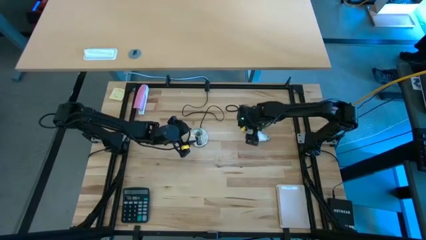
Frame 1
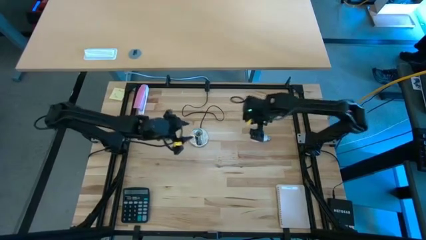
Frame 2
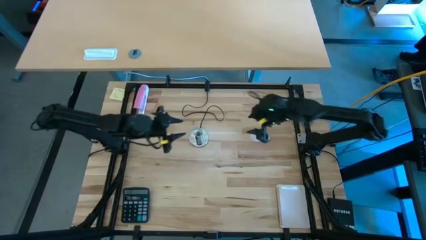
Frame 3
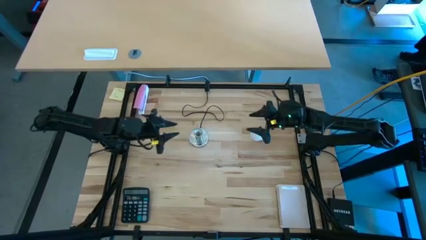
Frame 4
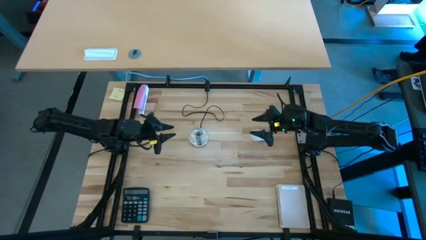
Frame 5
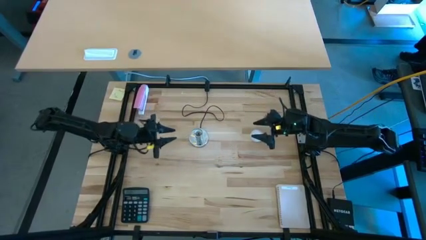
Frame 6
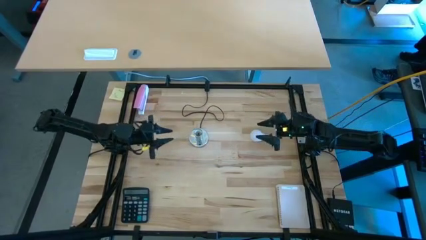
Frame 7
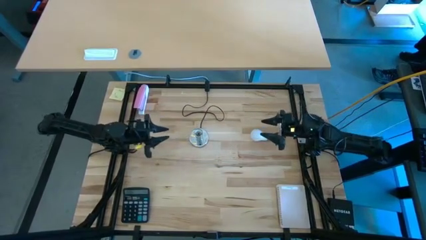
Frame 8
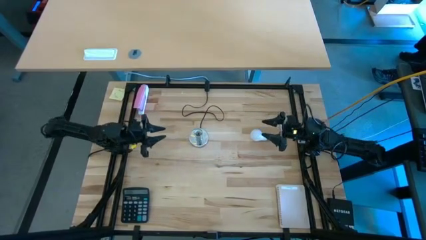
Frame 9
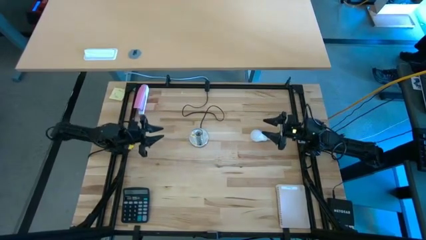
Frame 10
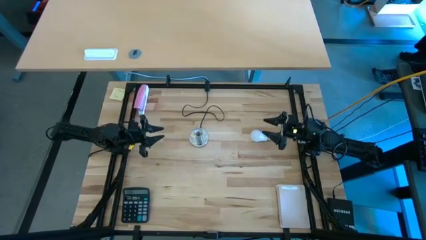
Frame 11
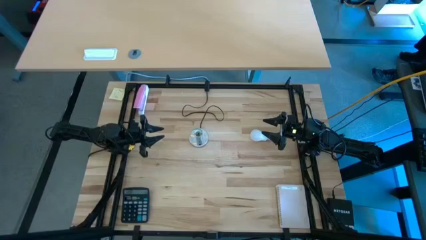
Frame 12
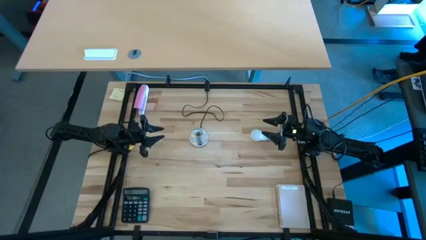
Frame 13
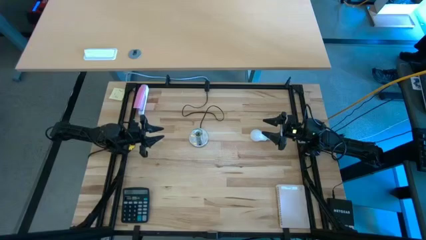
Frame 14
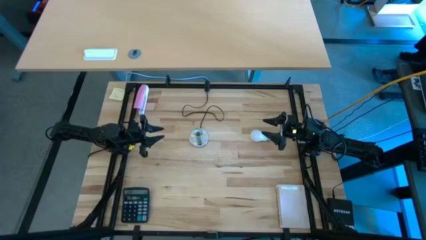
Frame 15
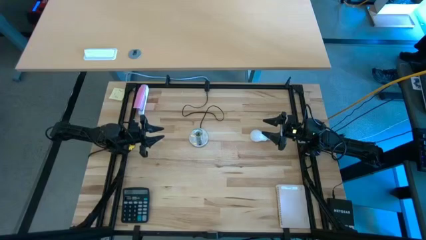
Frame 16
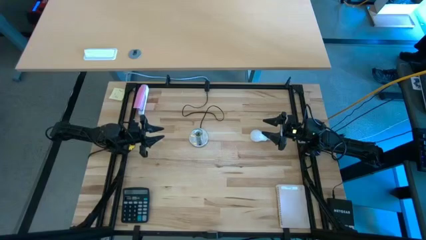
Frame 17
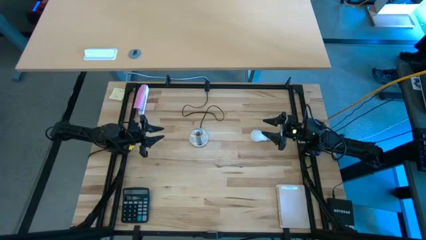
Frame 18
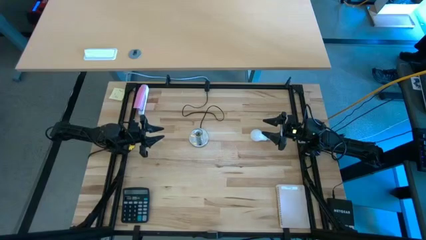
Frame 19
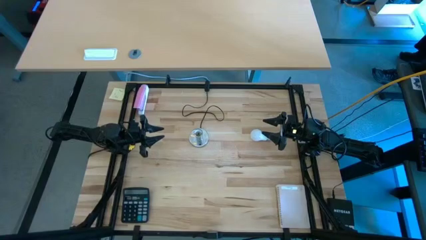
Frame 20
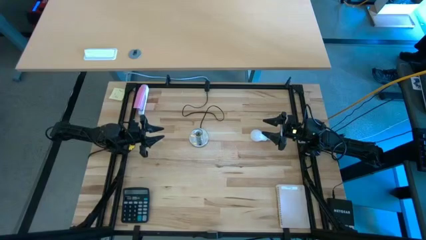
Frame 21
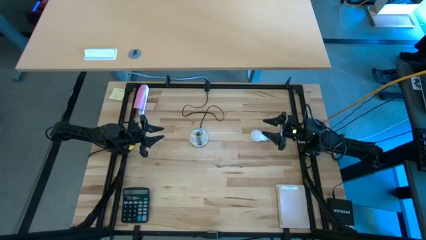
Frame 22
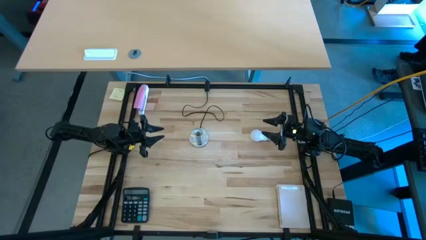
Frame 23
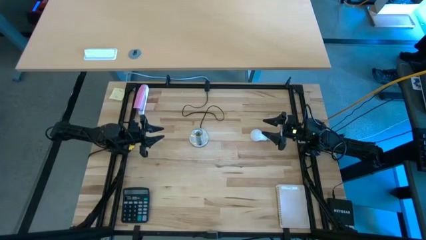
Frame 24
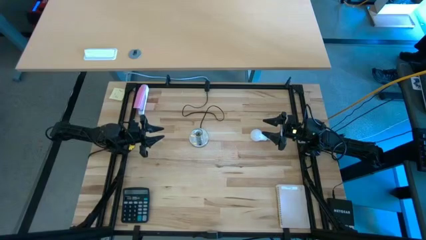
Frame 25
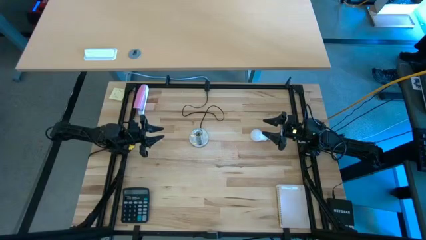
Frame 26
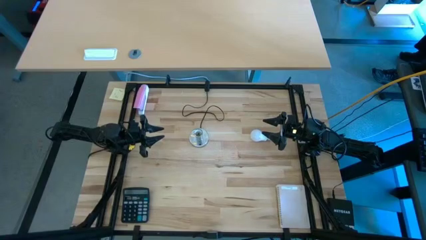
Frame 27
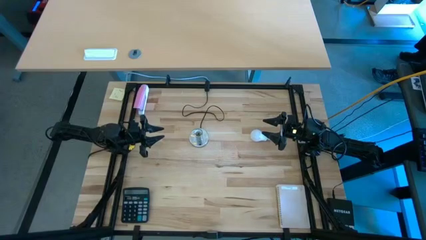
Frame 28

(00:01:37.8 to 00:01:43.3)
Task: Screw lightbulb
Return to Home Position

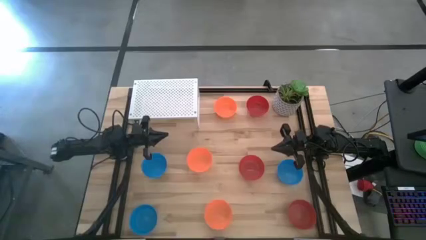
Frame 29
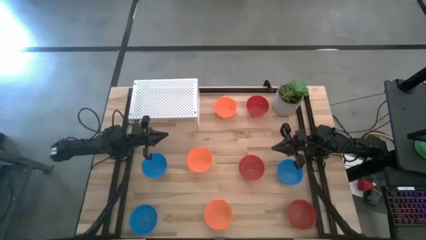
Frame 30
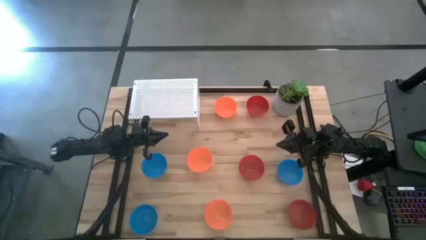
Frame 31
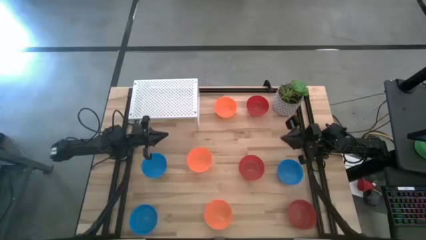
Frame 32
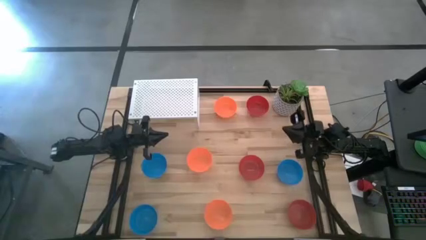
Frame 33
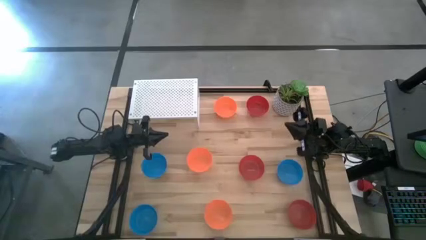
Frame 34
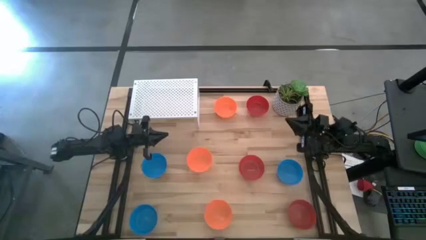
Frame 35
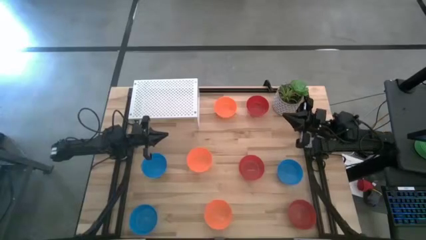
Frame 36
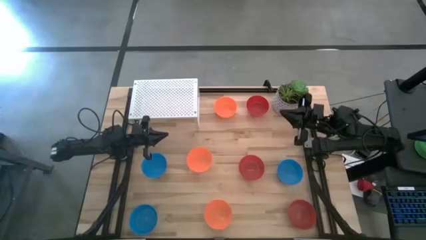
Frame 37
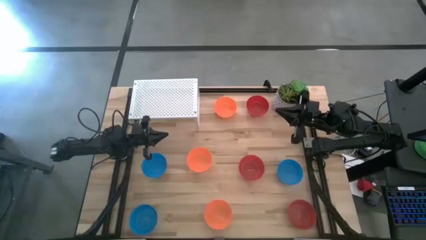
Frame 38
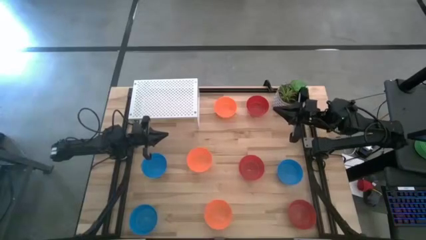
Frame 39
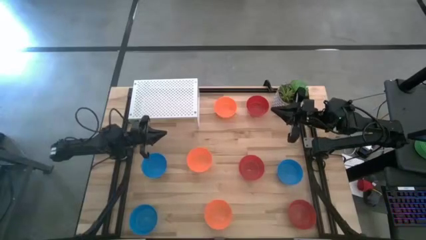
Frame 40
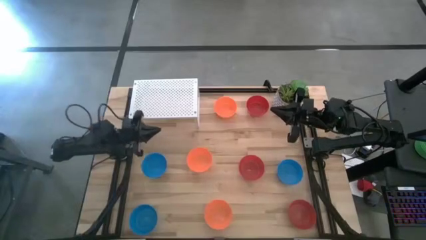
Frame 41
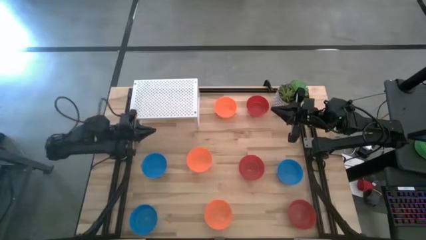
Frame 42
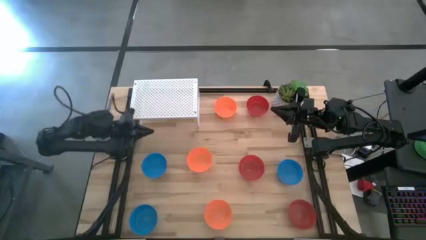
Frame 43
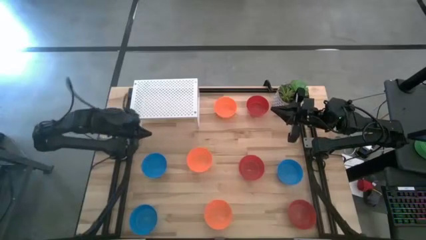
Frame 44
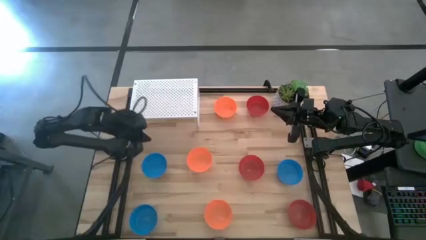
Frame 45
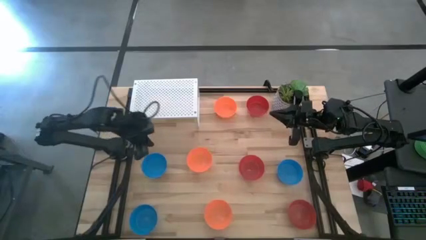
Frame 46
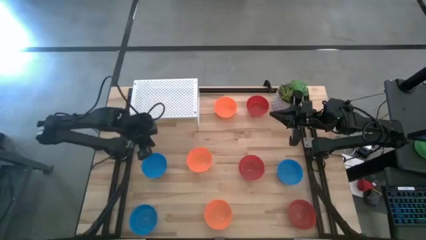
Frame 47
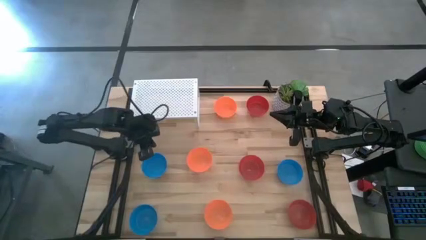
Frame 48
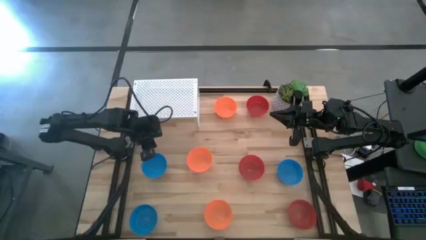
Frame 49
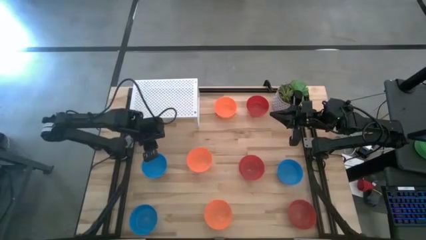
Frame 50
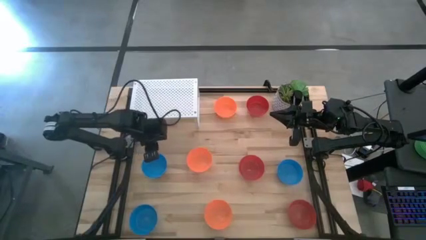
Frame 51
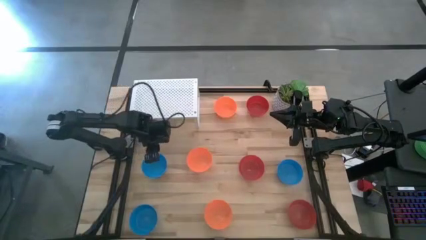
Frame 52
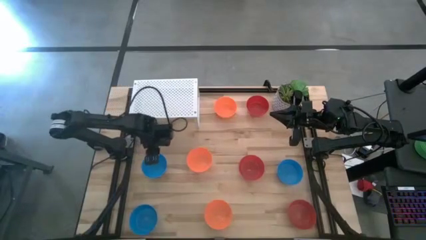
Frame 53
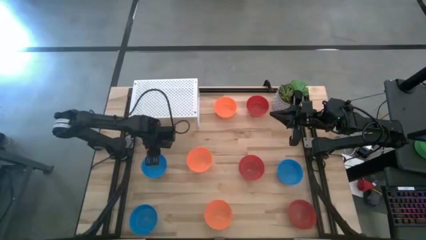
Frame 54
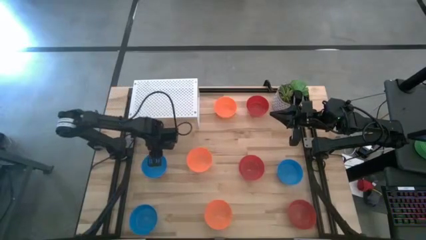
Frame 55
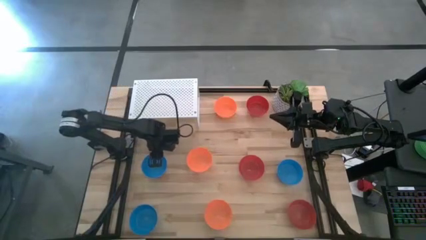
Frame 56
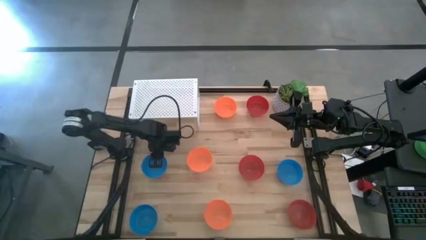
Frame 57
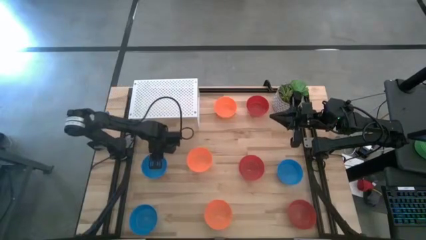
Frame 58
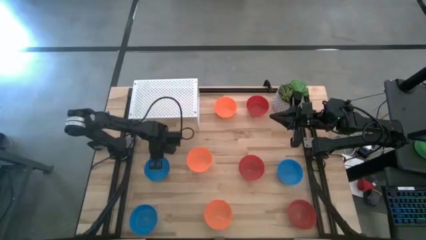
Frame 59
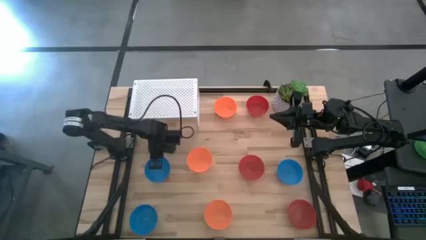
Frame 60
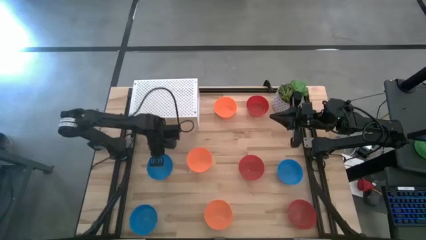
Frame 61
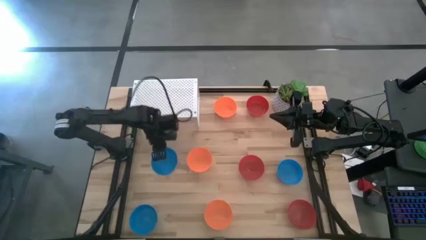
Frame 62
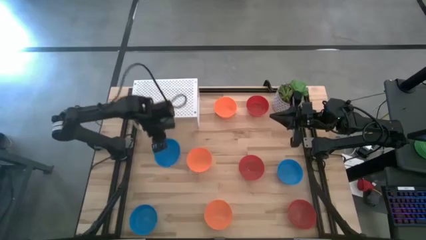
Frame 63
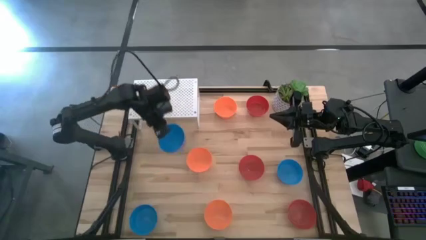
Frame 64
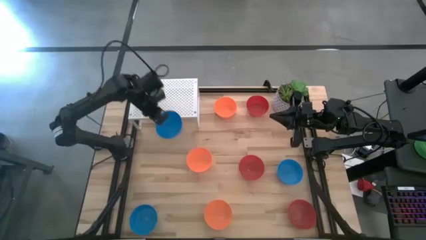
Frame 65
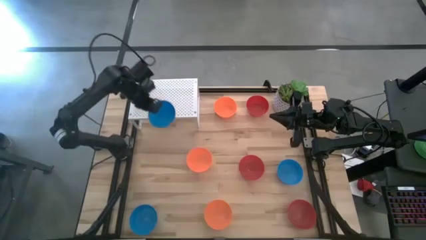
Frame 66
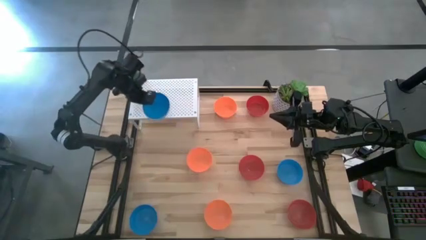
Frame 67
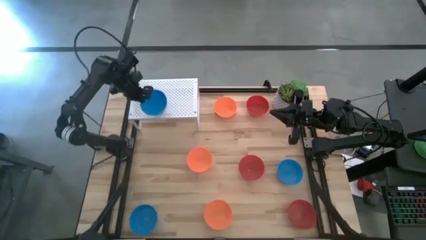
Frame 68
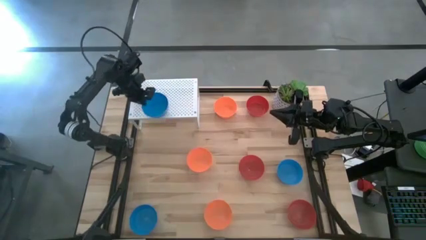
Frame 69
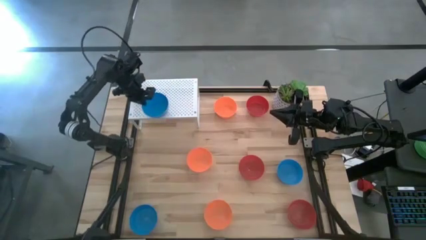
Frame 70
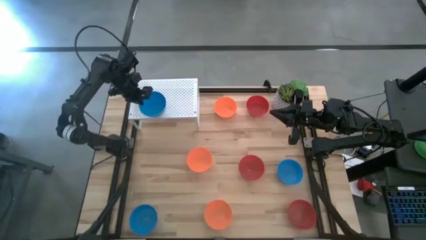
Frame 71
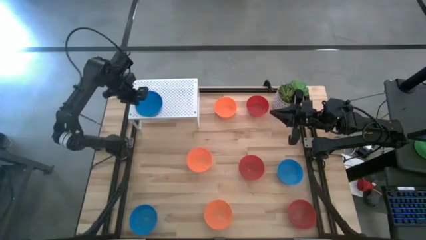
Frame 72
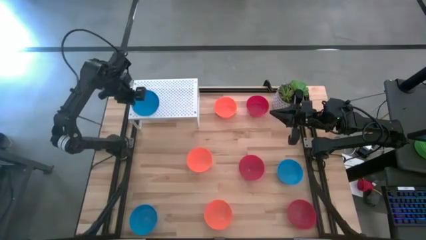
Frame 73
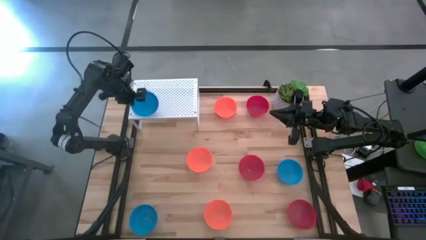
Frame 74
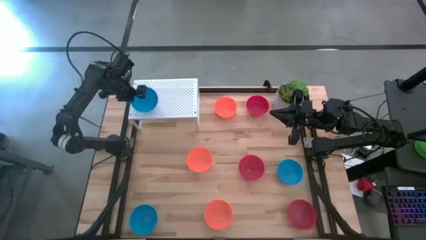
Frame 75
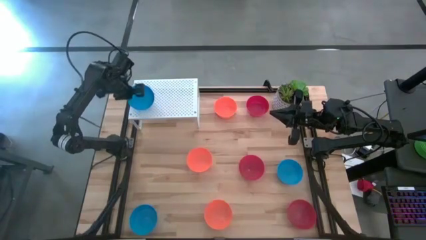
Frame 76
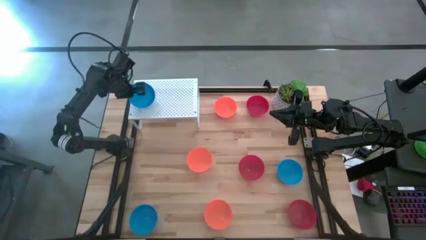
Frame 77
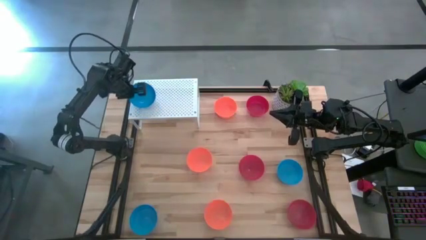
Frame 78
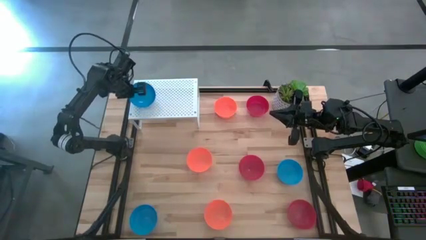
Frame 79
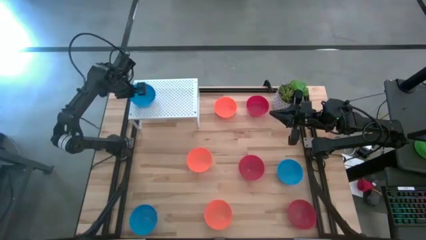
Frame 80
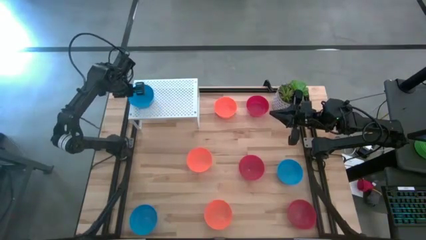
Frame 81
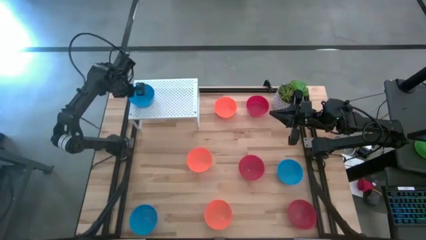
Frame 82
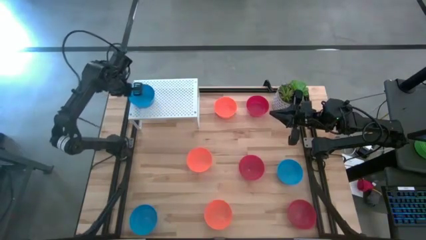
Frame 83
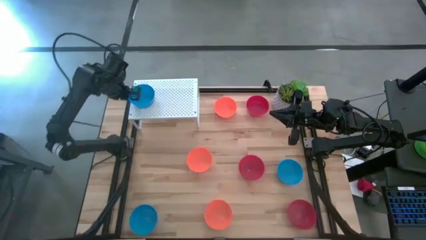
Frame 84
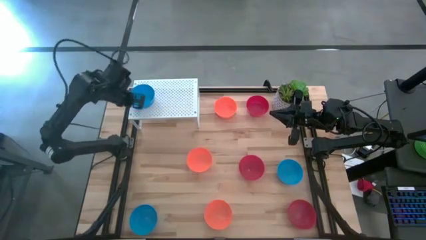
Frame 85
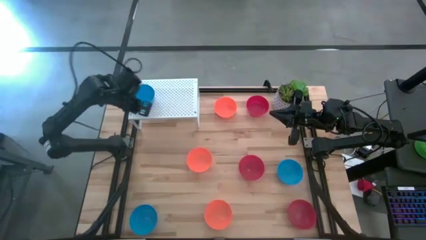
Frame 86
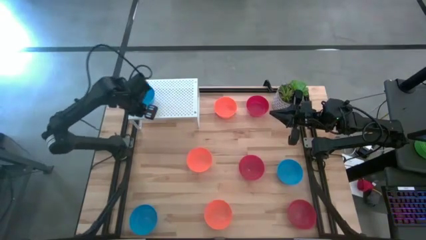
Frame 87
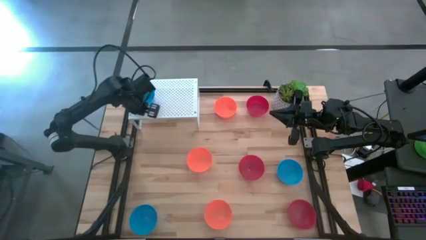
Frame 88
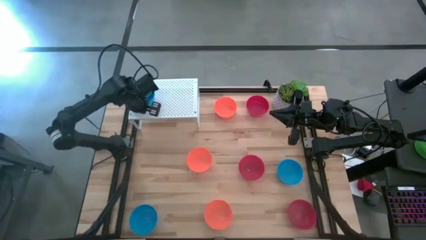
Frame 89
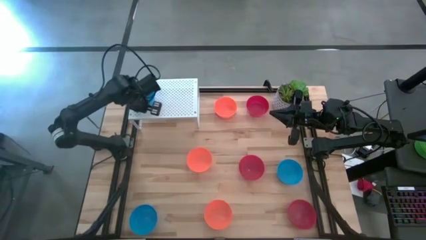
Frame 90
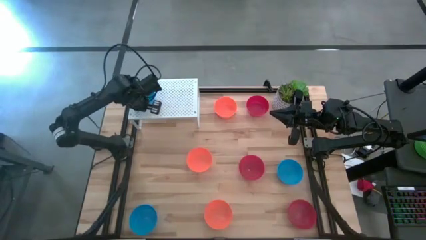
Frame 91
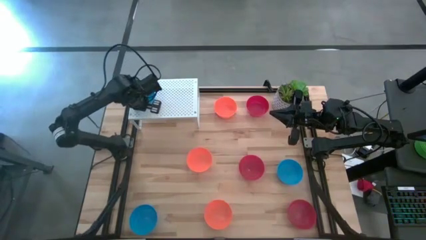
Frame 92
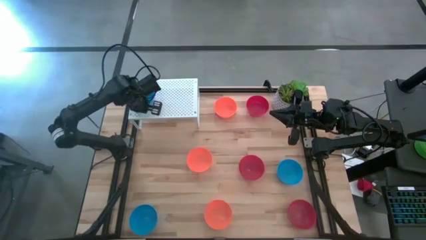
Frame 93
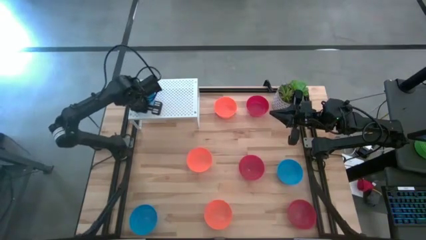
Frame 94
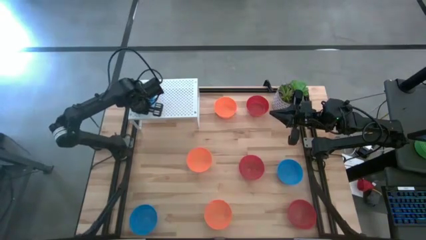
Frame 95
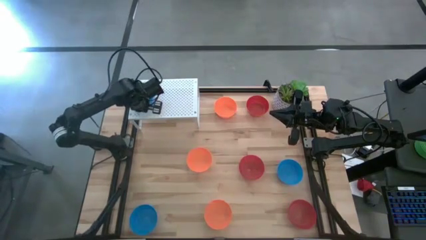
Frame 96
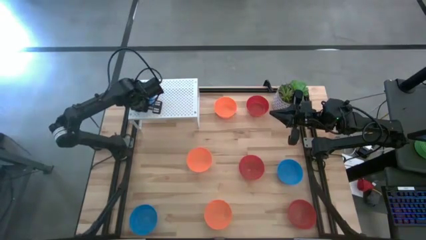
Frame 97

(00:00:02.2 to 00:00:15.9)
Task: Pick & Place Mini bowls
Put the top right blue bowl on the shelf
